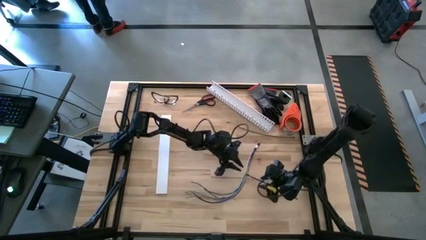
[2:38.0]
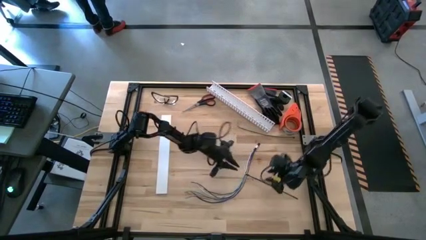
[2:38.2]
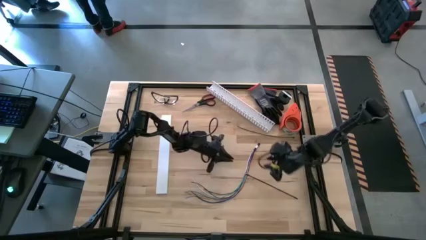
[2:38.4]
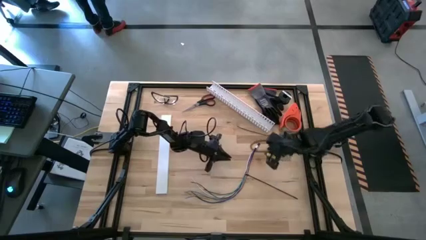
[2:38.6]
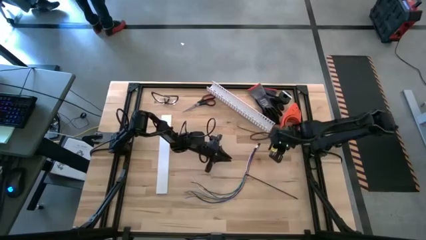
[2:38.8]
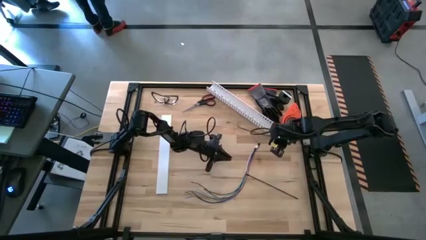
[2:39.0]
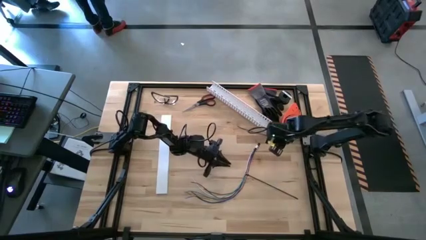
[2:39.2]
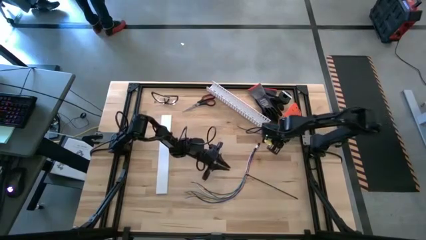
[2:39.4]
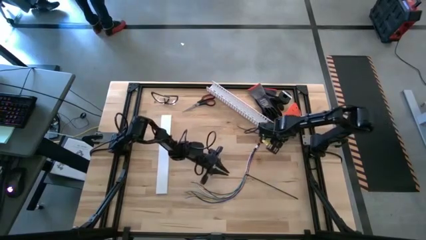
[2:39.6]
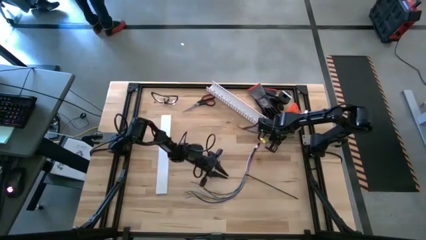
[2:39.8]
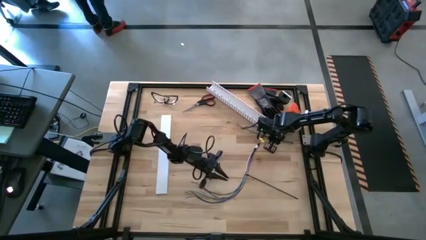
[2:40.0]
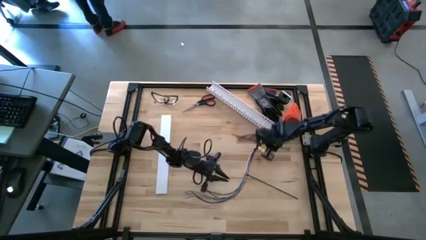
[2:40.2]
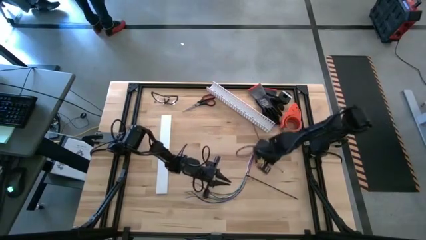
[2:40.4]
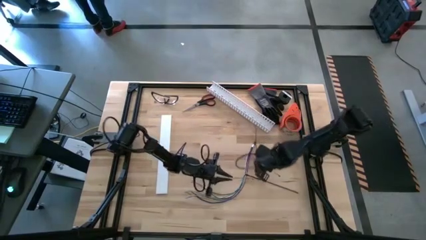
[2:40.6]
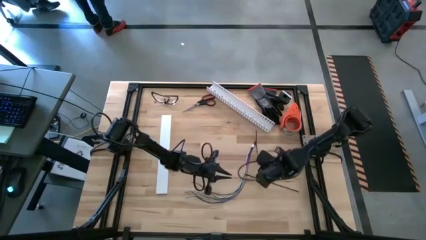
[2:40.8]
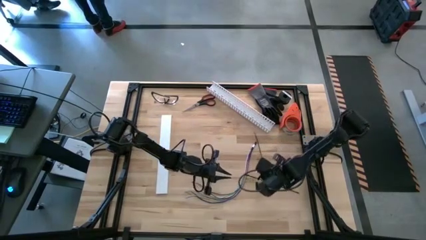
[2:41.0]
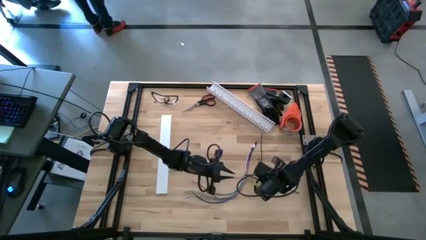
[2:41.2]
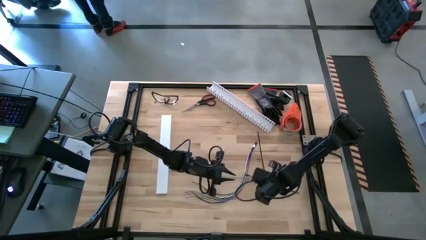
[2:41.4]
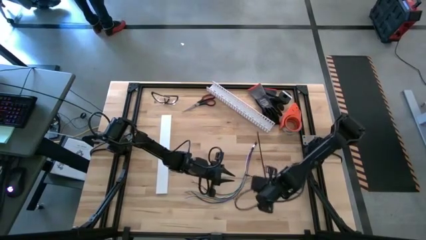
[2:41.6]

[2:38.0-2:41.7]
Task: Ziptie cables
Wrap the black zip tie on the cable wires

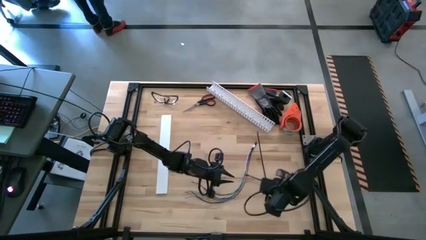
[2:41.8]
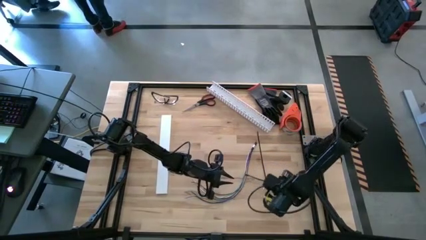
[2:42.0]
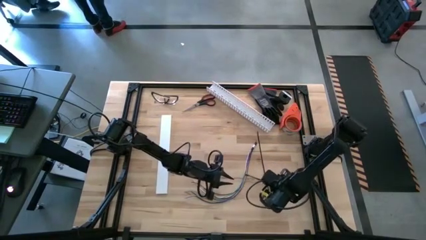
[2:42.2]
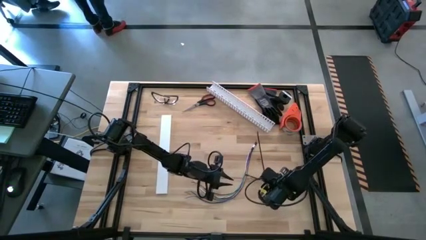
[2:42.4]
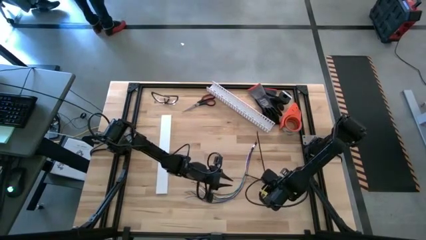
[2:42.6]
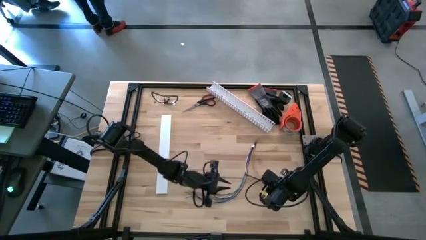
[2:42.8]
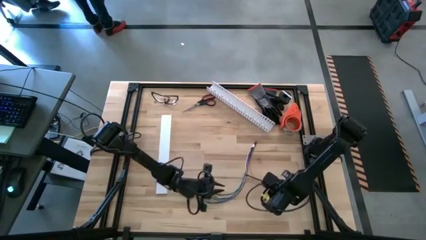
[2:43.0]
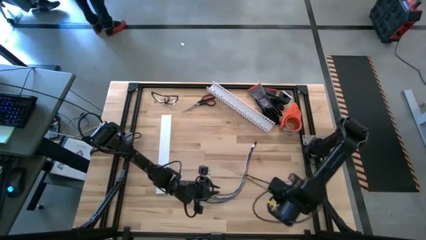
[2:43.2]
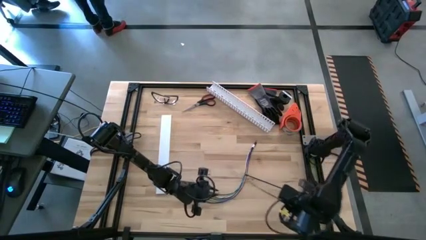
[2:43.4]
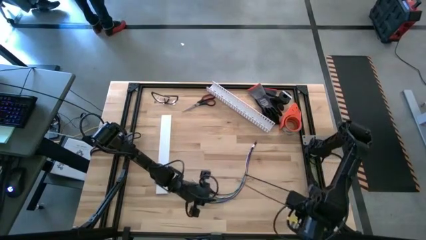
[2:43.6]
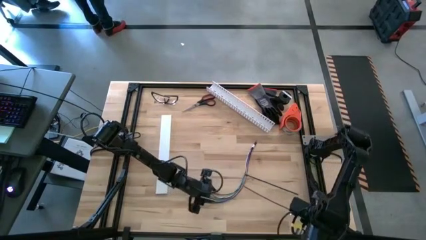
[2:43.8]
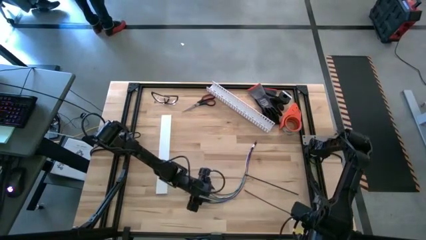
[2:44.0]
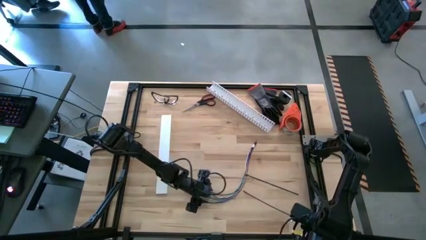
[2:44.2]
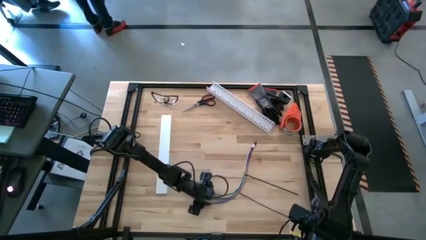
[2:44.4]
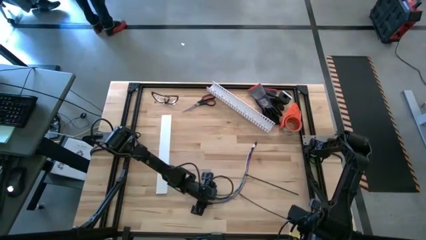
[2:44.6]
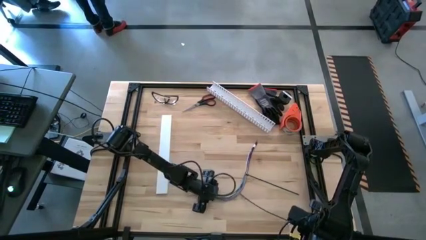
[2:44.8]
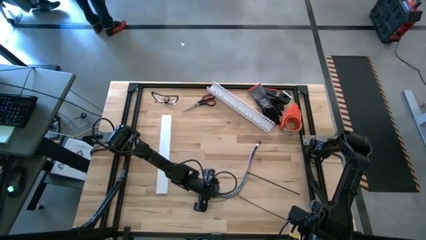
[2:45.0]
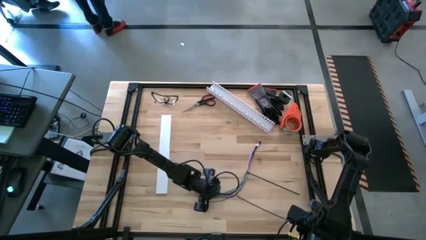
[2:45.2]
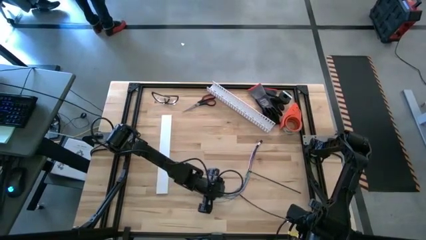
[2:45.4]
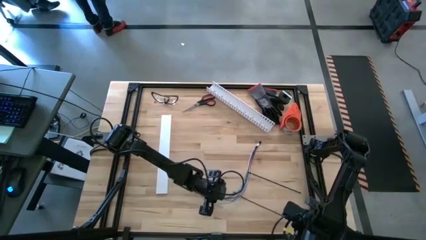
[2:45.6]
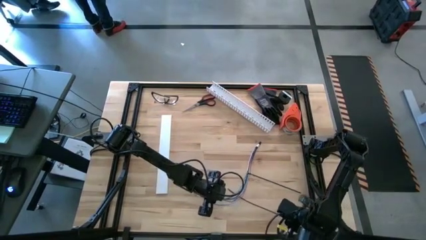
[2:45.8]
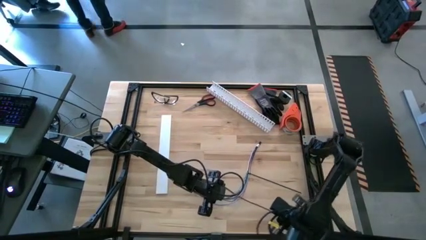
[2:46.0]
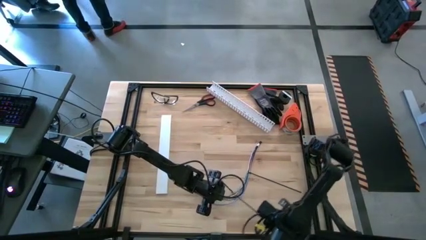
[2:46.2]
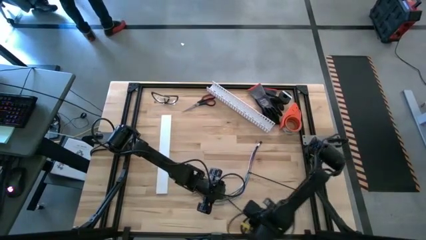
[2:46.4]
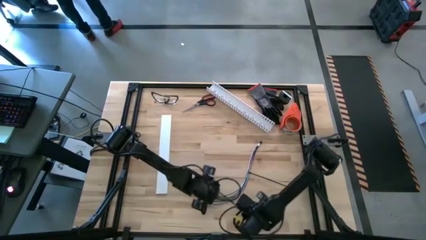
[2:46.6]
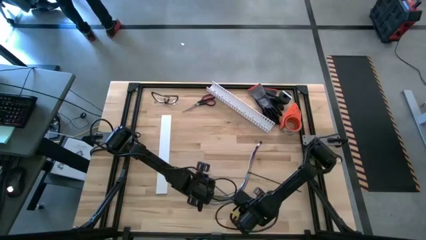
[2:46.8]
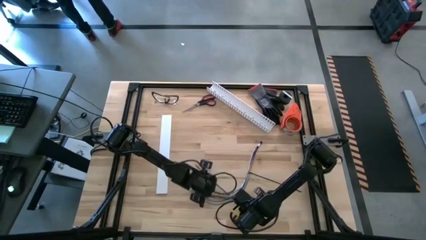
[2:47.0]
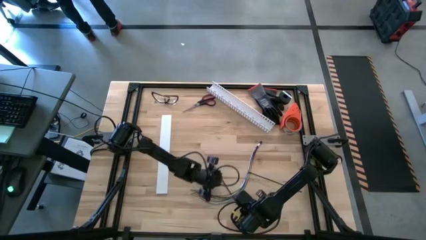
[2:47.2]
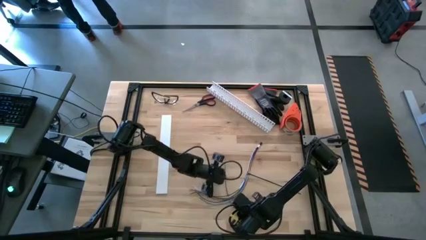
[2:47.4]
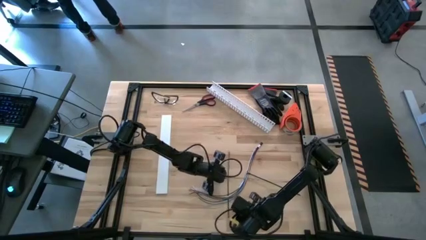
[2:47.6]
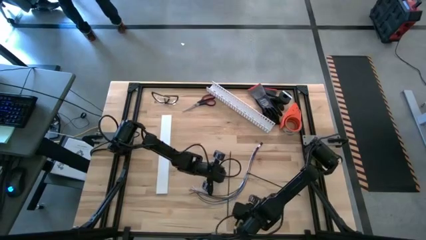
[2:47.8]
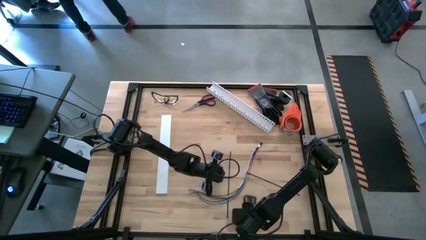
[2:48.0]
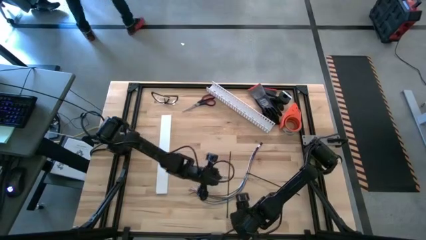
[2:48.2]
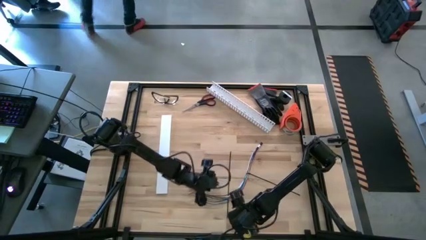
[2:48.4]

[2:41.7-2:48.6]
Wrap the black zip tie on the cable wires

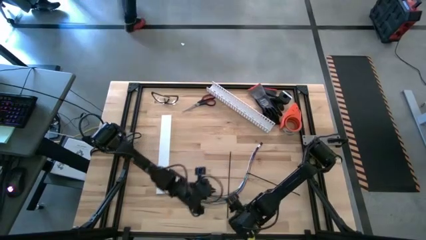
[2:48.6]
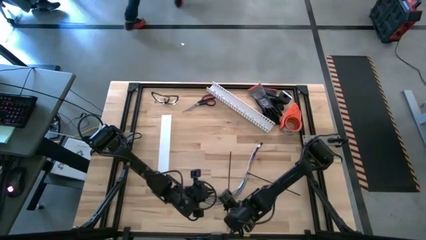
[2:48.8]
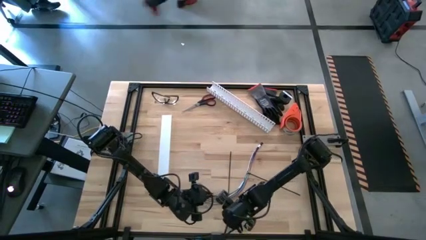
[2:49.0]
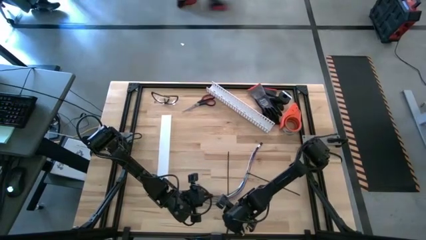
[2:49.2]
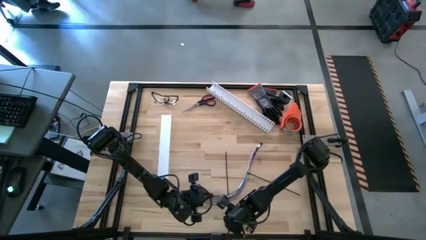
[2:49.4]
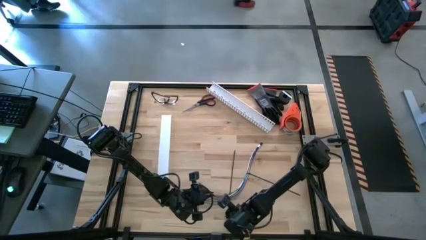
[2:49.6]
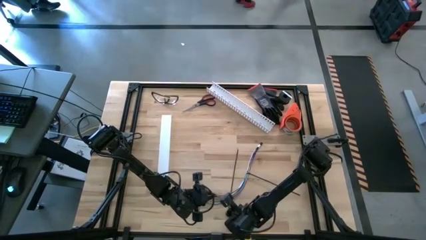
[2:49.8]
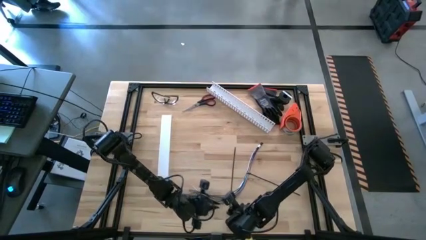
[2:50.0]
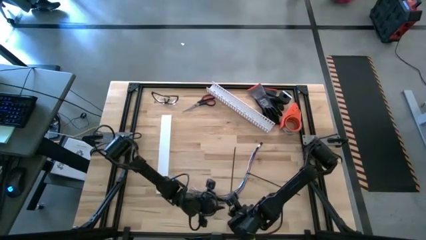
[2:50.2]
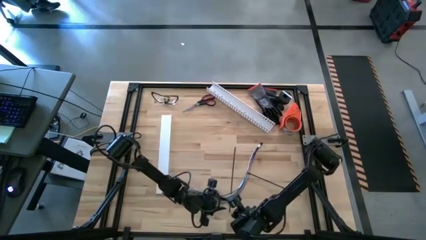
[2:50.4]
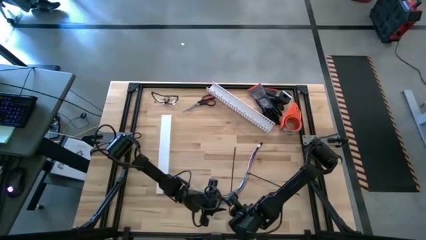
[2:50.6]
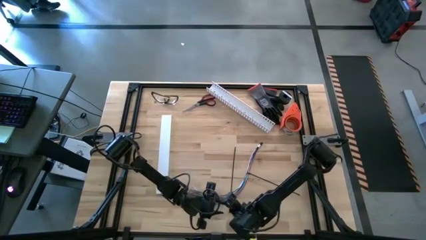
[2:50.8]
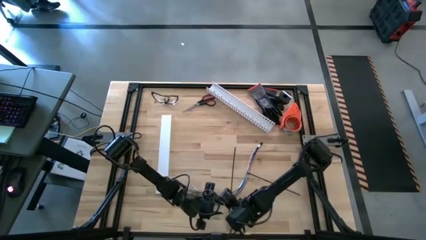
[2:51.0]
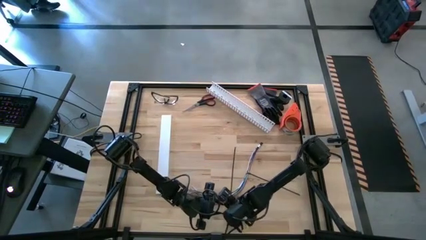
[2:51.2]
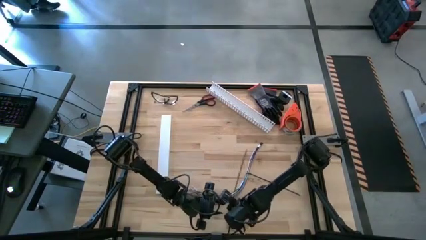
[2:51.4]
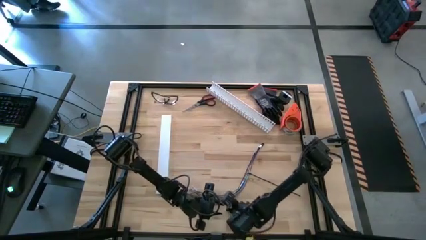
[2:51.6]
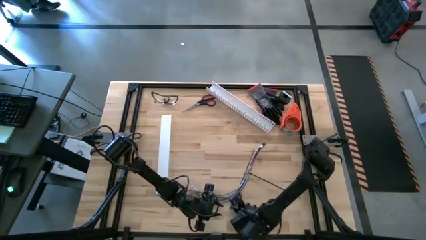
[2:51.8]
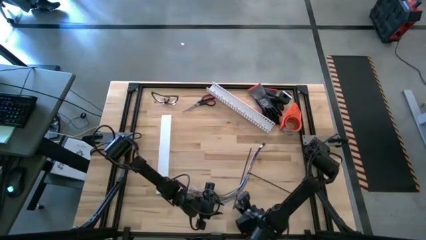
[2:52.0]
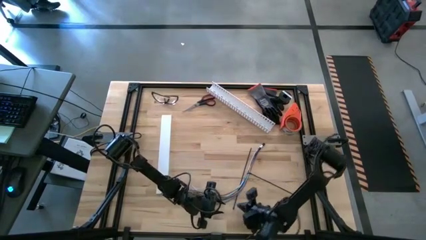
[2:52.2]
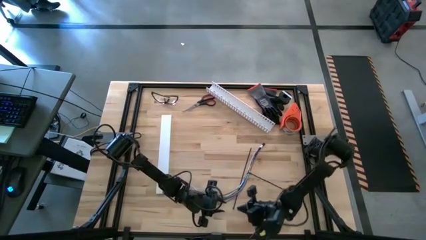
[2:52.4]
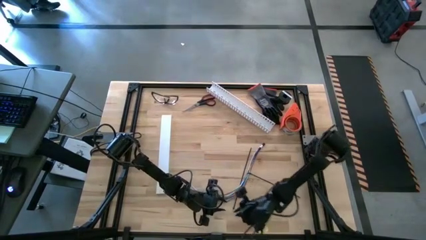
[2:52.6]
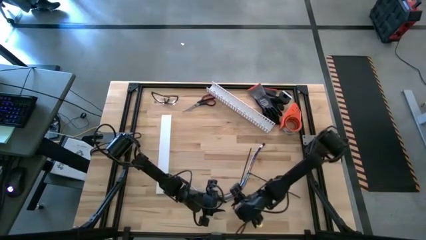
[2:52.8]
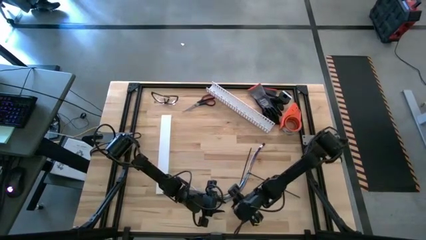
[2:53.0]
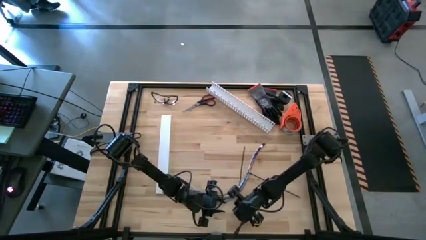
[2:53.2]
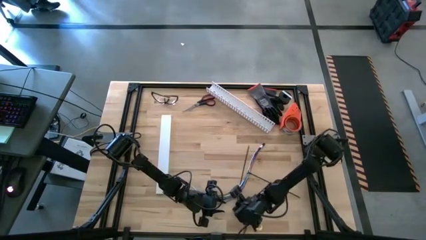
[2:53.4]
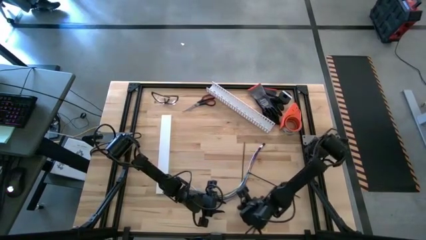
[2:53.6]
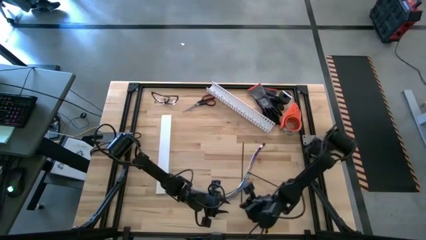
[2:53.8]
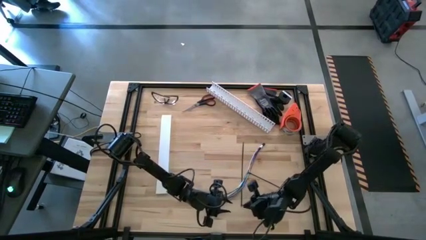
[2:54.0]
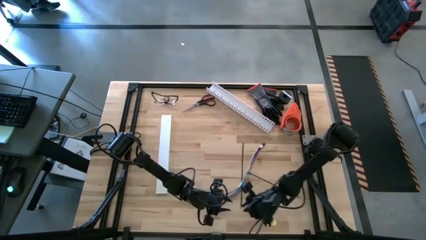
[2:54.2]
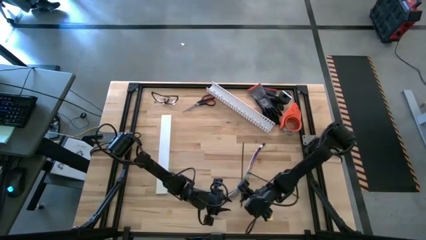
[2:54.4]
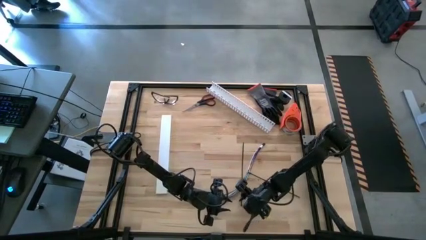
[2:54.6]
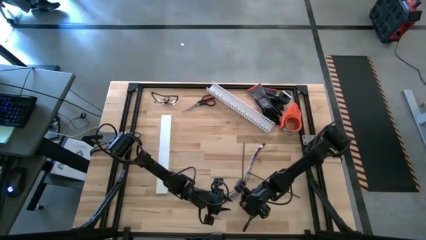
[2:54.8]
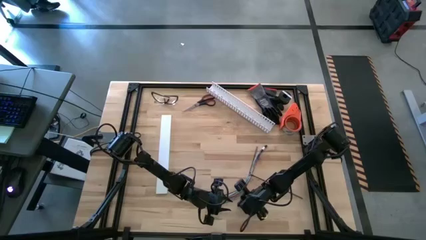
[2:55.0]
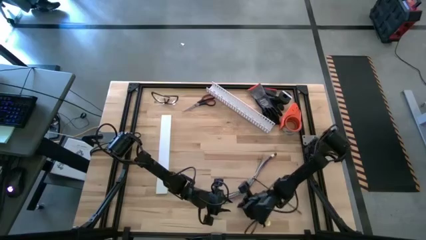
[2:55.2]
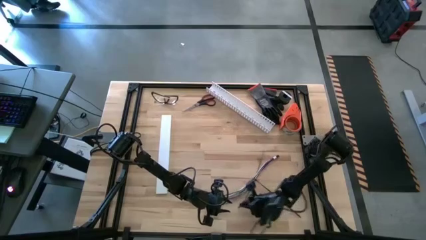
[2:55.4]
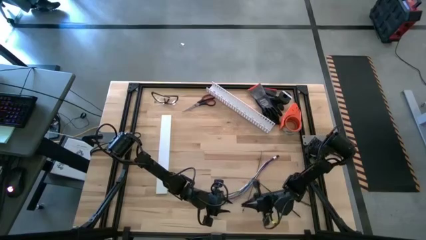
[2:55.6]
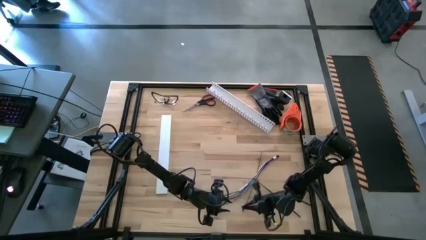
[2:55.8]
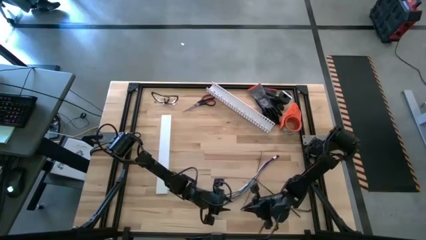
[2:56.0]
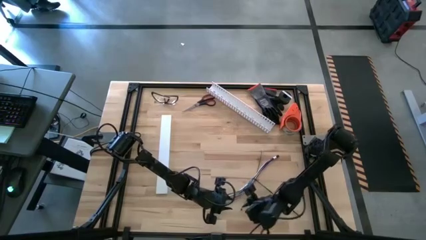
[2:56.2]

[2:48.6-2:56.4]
Wrap the black zip tie on the cable wires
